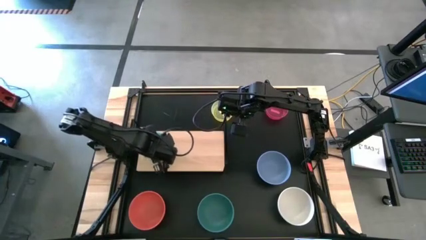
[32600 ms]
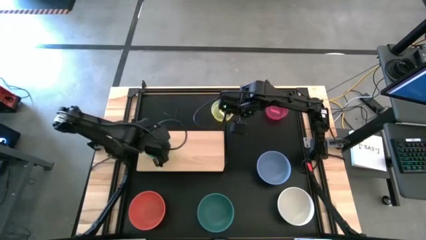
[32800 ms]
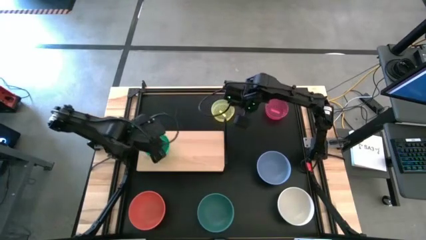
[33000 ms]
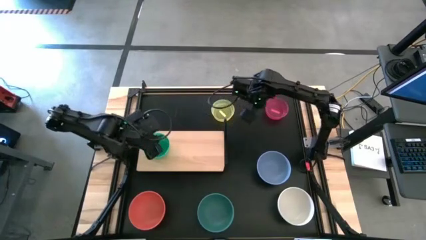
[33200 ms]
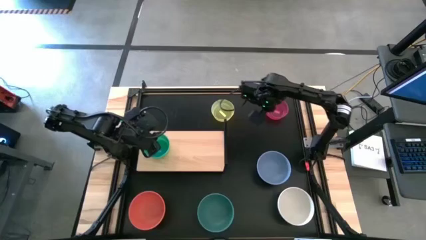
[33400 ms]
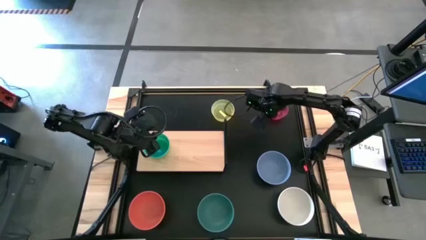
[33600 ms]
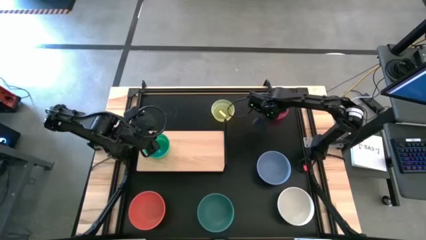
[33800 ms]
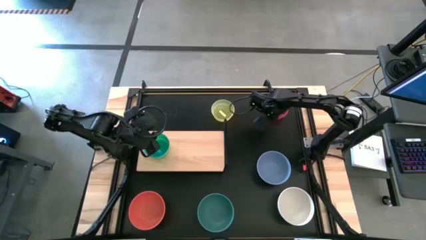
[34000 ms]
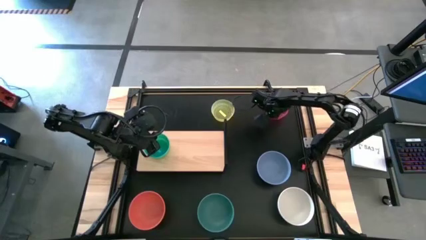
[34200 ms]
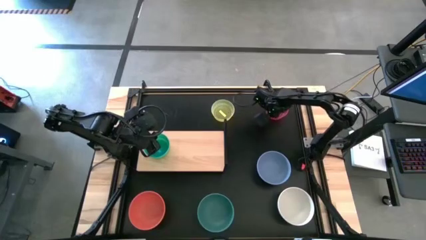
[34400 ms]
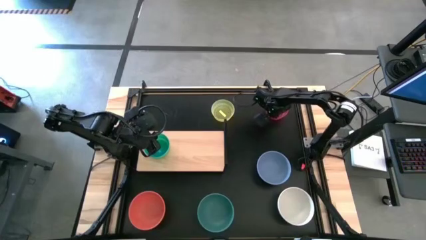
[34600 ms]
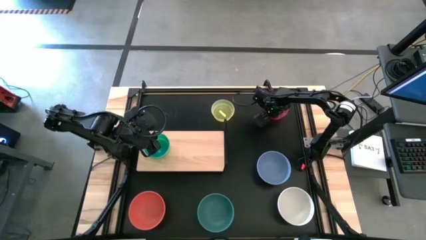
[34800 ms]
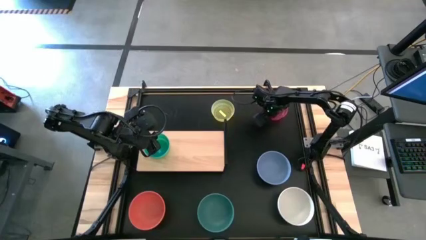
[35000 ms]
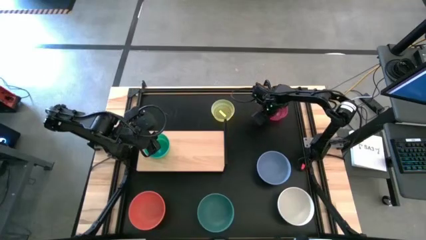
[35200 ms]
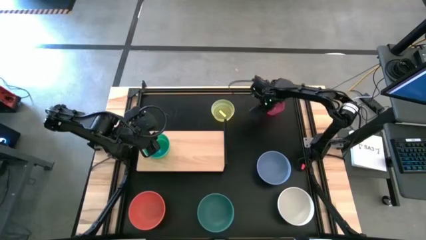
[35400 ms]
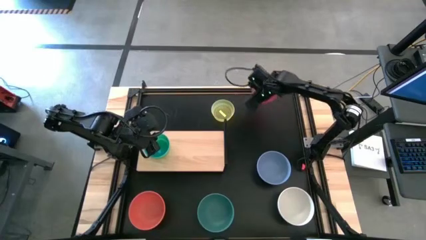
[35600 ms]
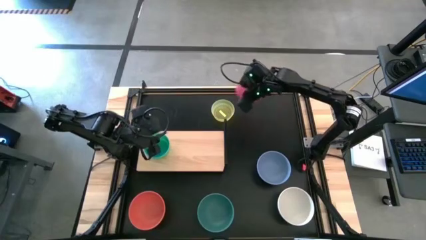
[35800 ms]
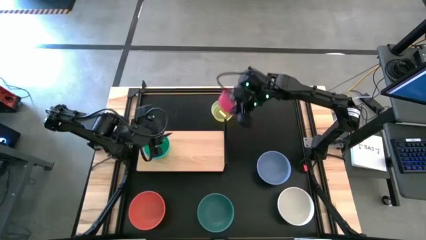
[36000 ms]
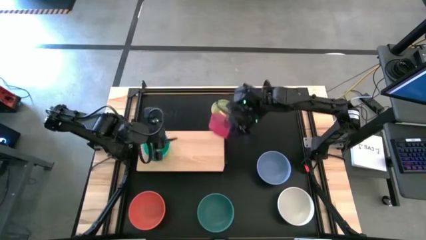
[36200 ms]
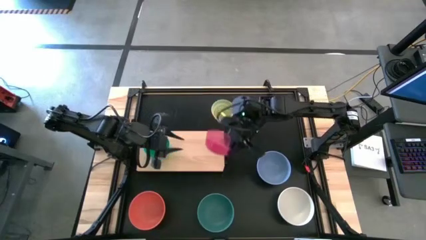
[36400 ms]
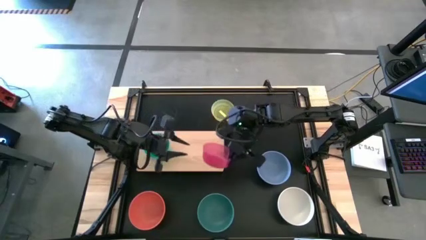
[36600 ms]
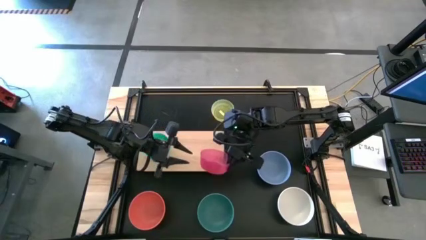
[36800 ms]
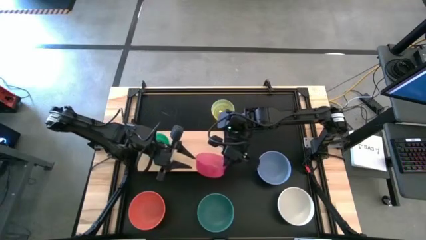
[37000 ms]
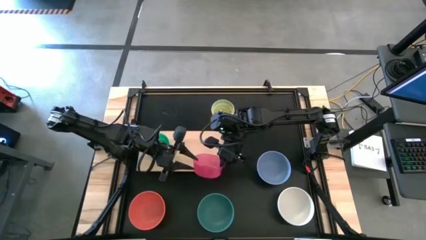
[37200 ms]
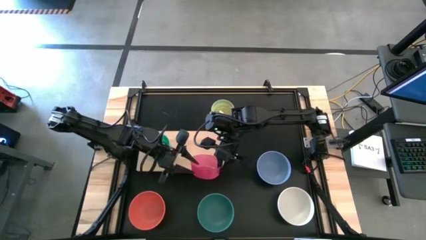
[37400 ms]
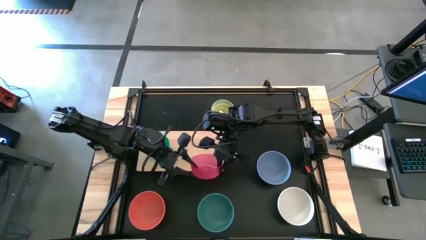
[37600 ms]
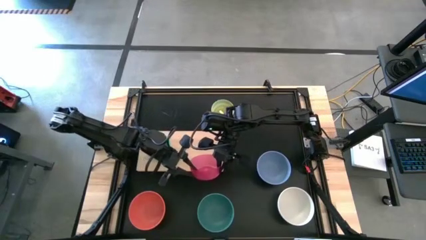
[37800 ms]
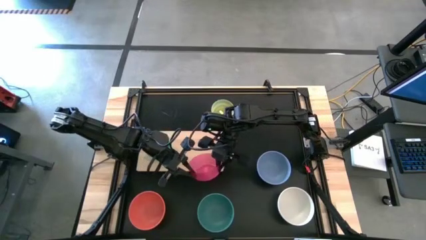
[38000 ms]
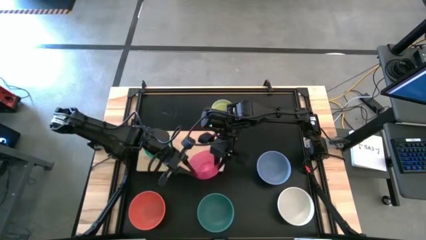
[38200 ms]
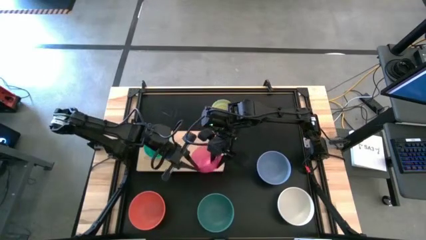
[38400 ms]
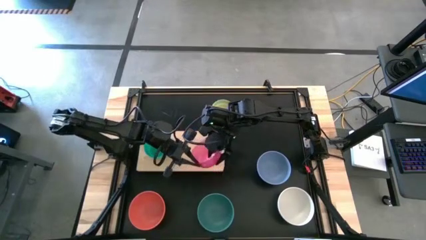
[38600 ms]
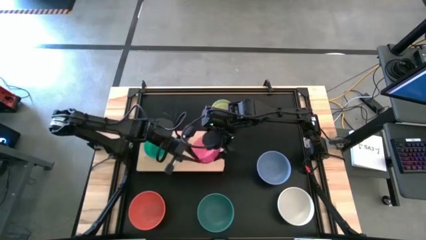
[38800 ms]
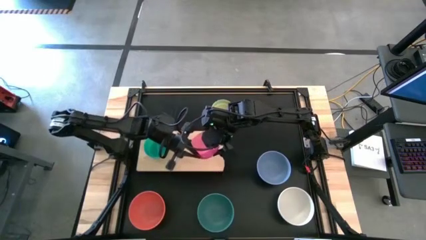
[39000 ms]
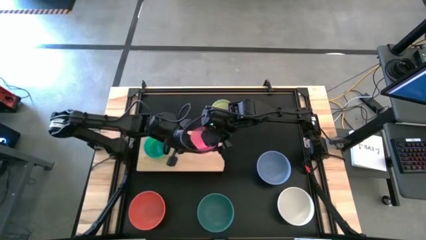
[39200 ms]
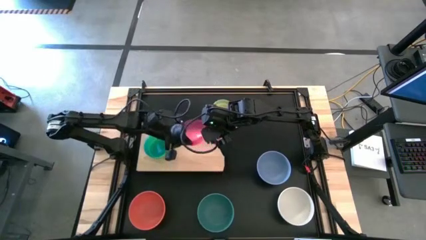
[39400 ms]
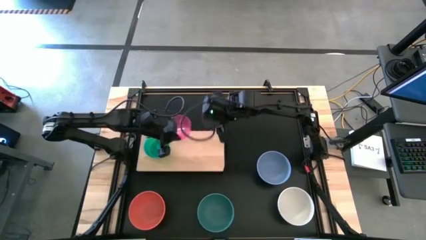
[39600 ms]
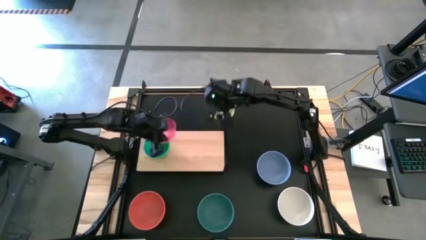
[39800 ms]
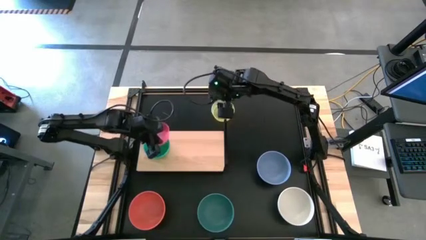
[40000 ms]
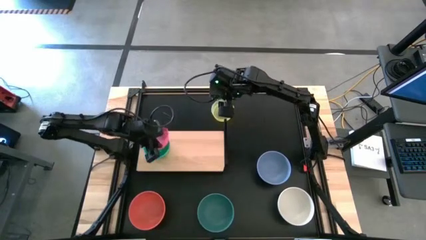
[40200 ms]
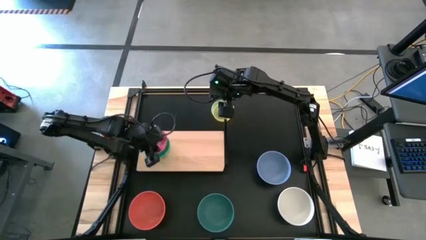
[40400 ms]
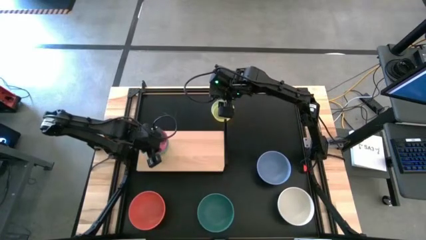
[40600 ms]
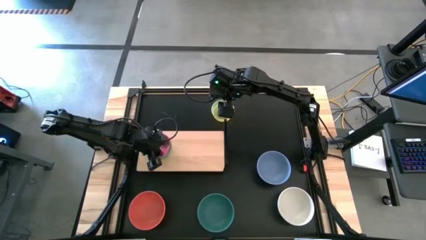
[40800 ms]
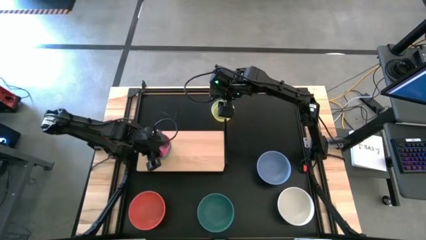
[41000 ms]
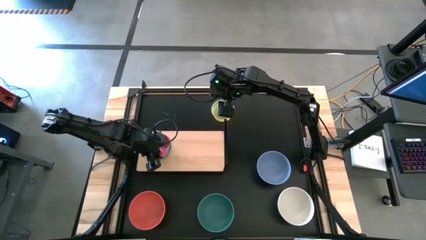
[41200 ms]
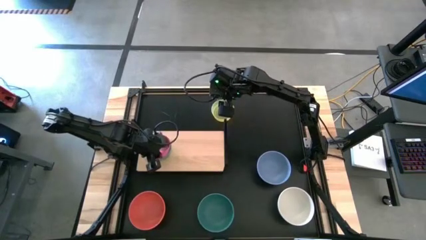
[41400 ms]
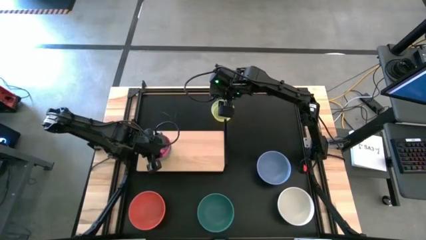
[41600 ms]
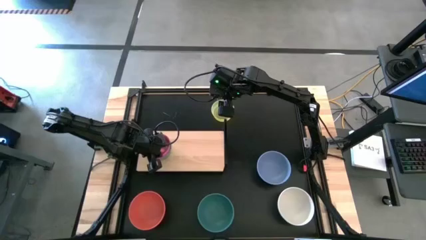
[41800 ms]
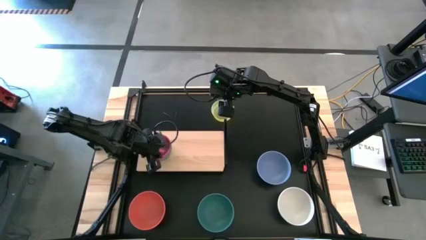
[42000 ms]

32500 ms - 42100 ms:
Task: Place and stack bowls onto a shelf
Stack the small pink bowl on top of the small blue bowl on the shelf

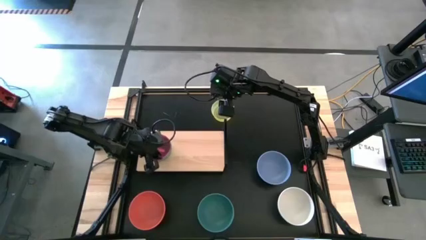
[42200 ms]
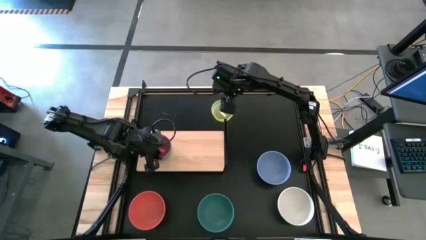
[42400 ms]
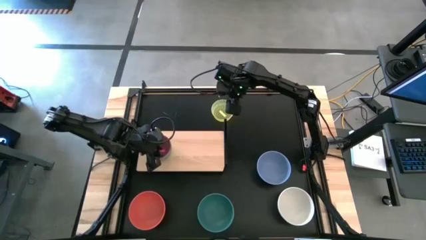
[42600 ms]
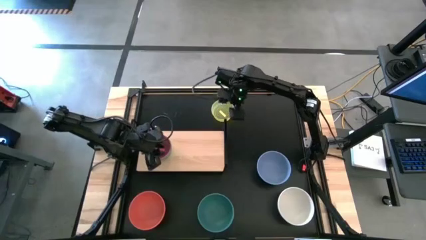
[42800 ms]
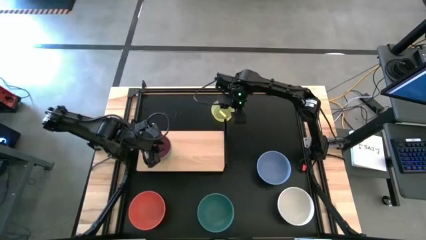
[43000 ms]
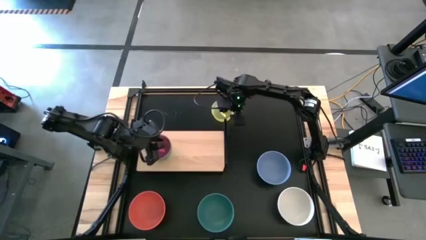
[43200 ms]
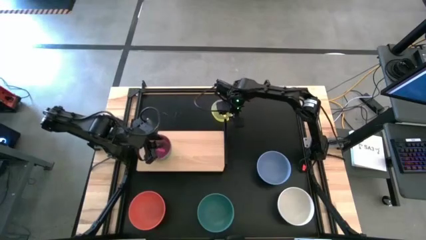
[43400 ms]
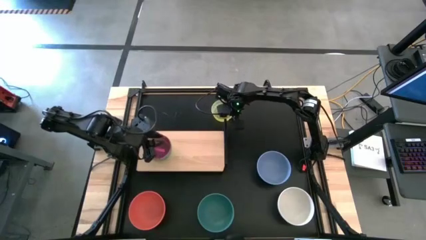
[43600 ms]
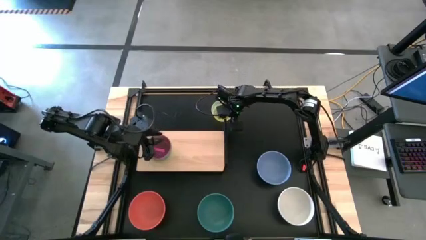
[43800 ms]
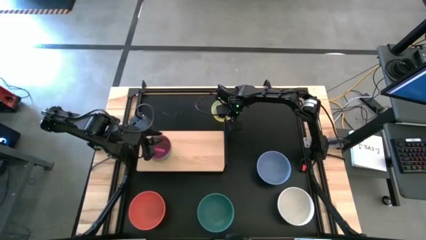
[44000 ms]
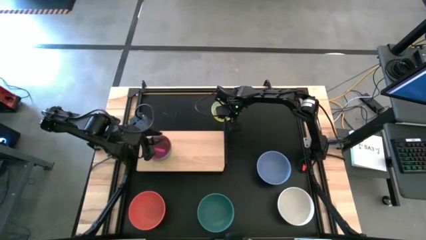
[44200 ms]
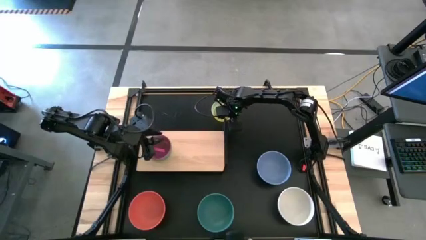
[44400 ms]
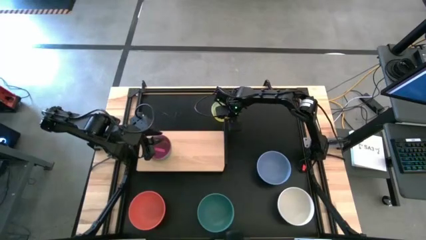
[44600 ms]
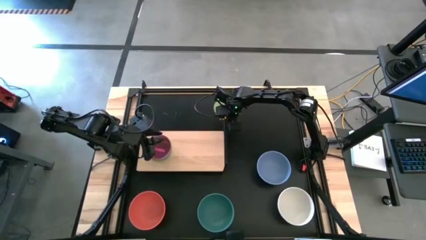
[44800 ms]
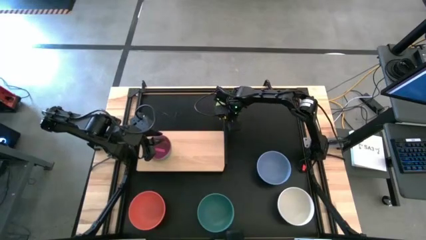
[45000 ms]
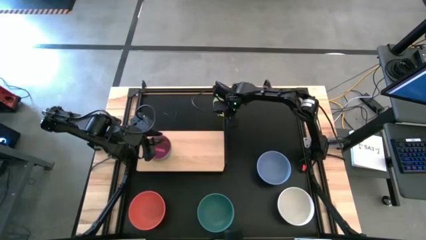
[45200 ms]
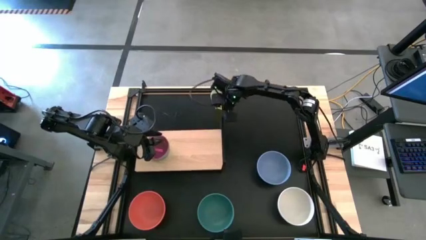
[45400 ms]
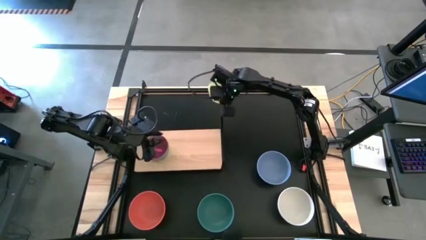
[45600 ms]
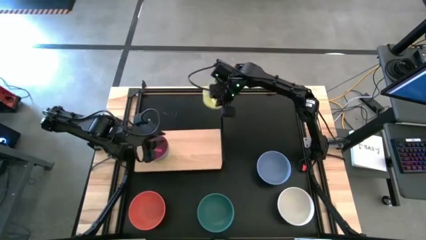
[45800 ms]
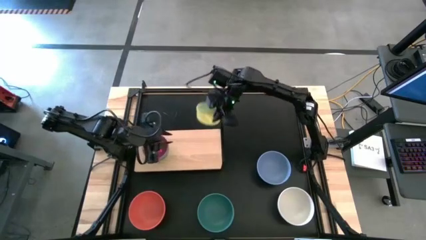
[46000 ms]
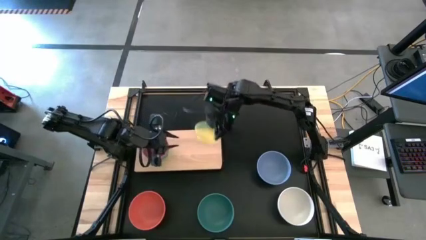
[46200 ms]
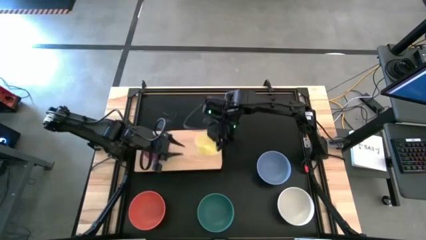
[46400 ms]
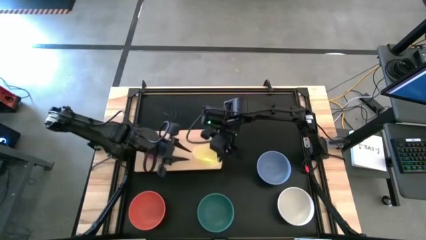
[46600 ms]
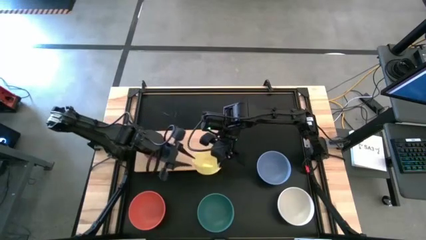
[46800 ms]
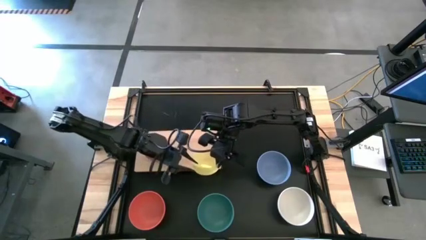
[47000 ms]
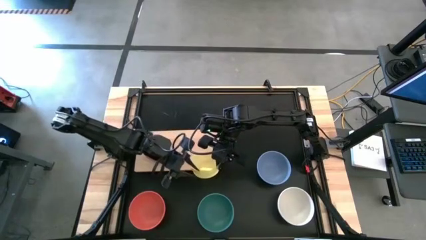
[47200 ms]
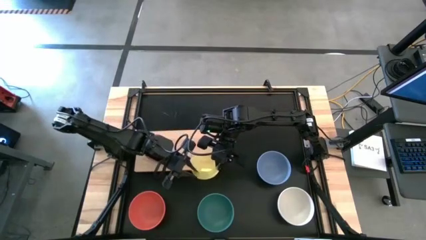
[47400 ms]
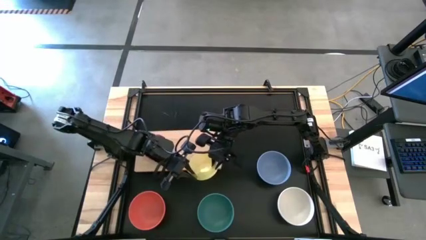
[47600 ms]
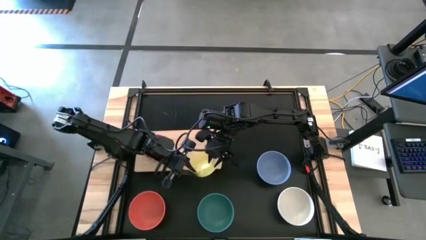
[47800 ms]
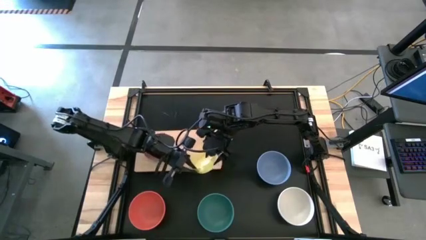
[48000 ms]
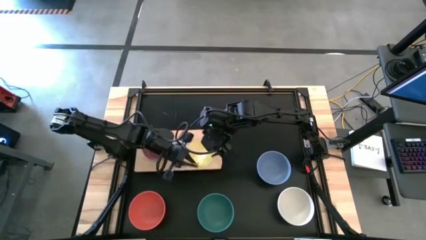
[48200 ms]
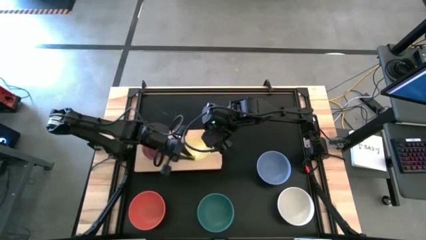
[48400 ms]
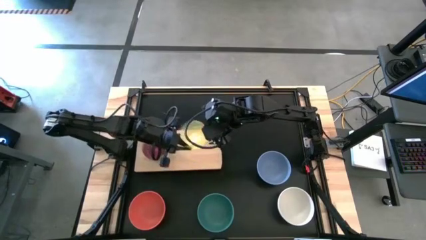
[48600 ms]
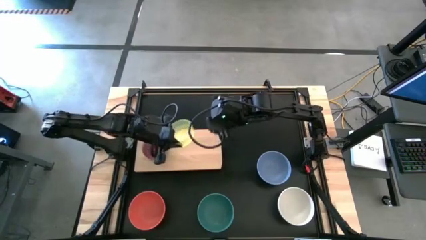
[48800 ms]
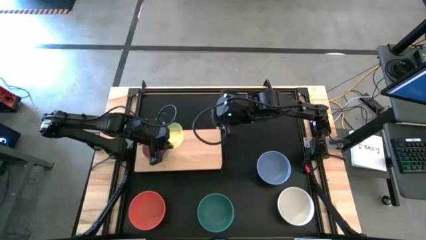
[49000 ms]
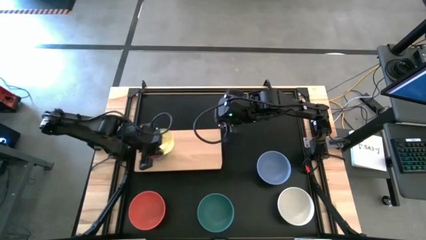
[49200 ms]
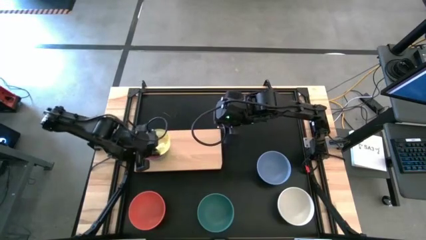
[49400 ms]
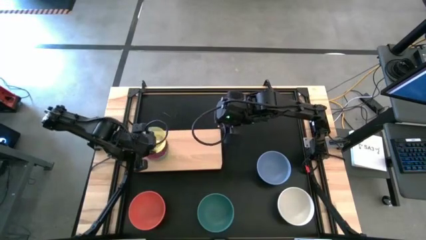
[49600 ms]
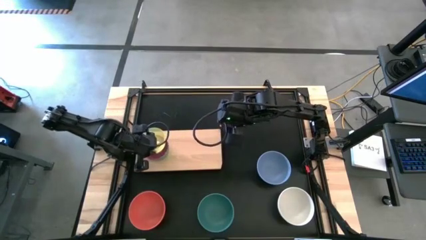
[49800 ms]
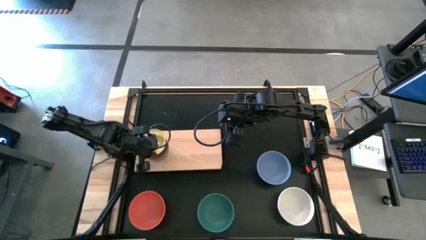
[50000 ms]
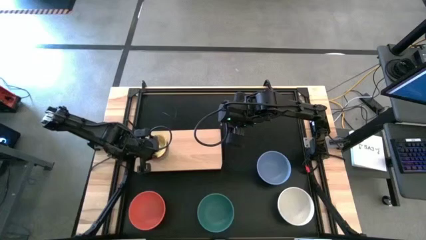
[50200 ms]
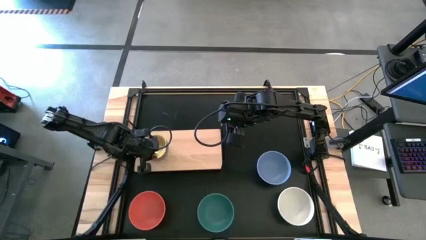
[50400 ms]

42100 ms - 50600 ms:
Stack the small yellow bowl on top of the small pink bowl on the shelf
